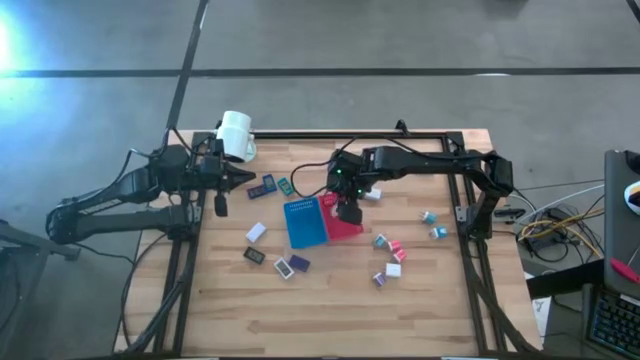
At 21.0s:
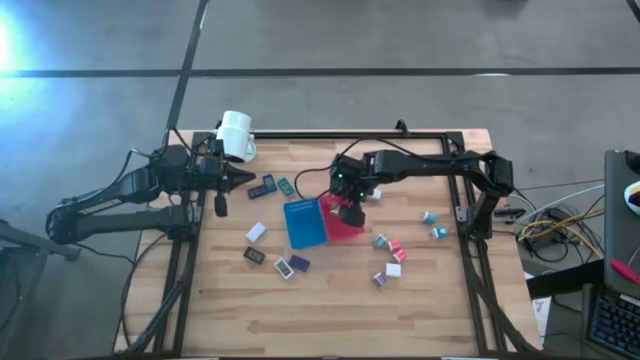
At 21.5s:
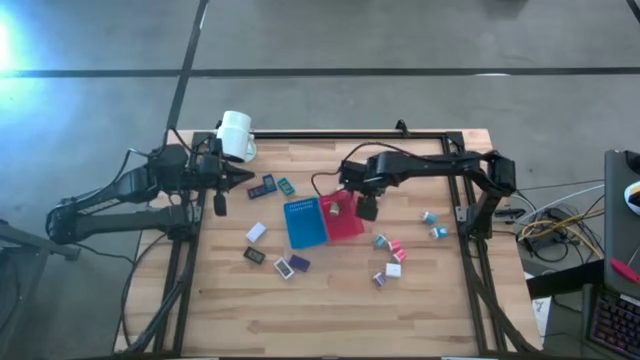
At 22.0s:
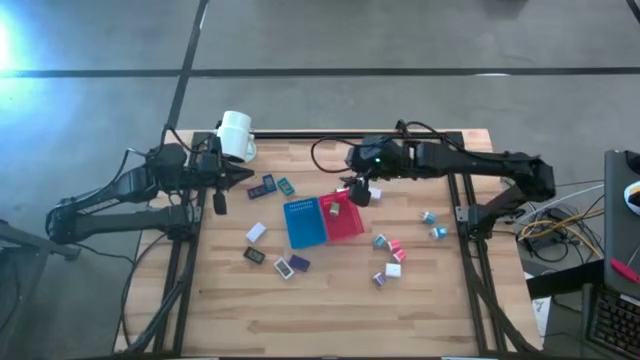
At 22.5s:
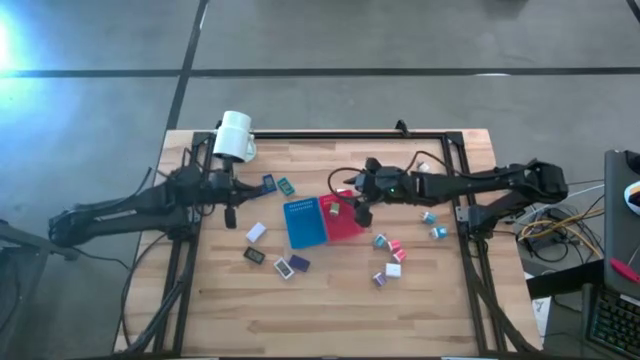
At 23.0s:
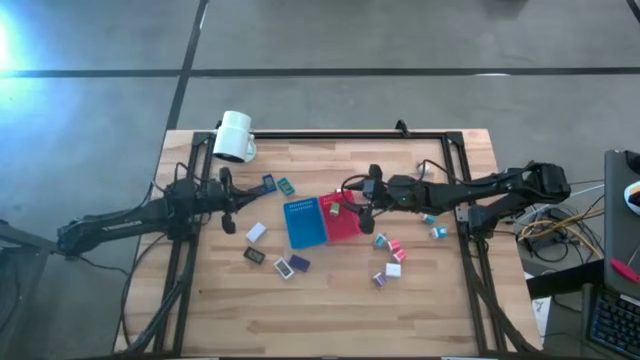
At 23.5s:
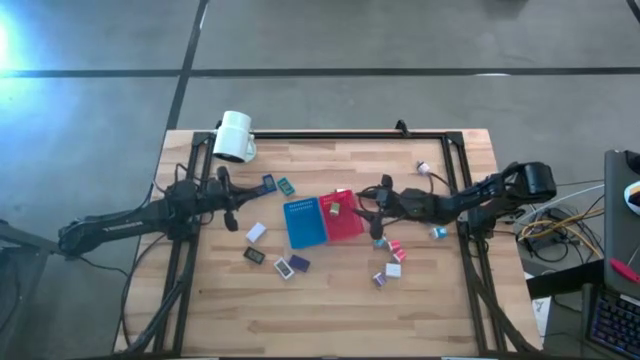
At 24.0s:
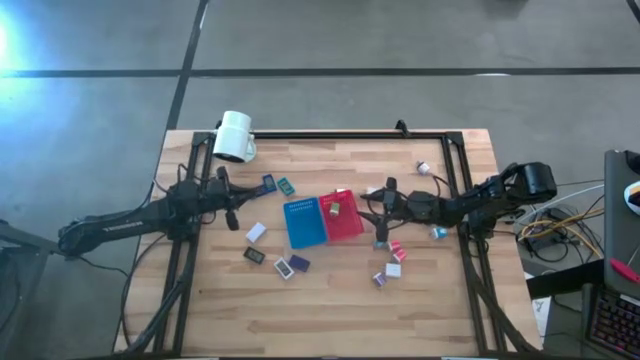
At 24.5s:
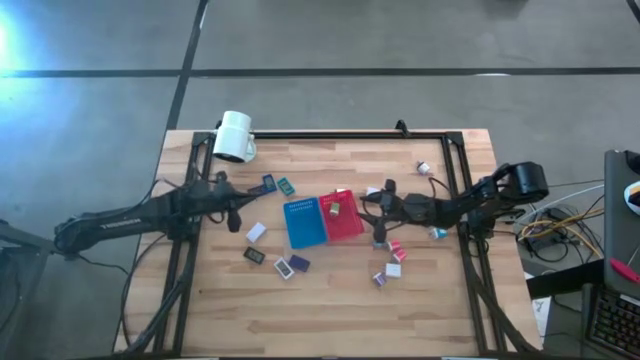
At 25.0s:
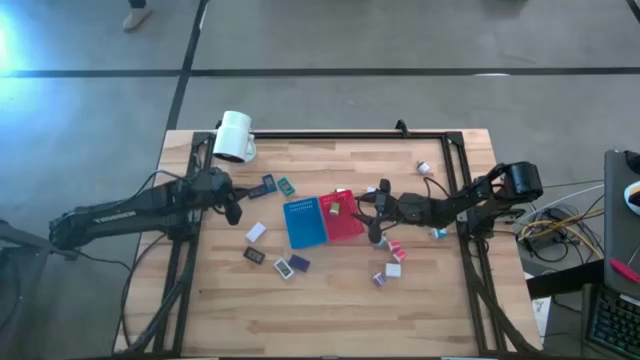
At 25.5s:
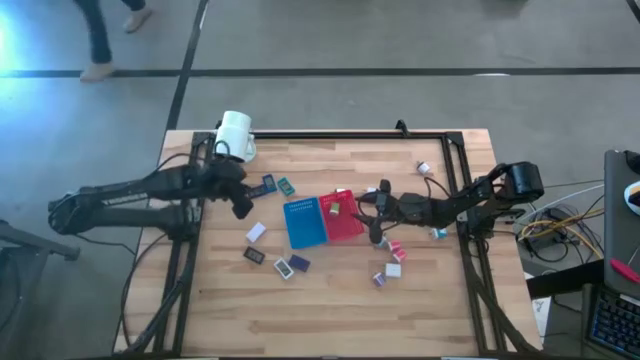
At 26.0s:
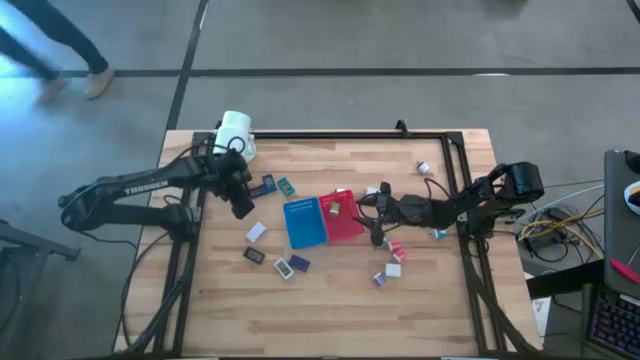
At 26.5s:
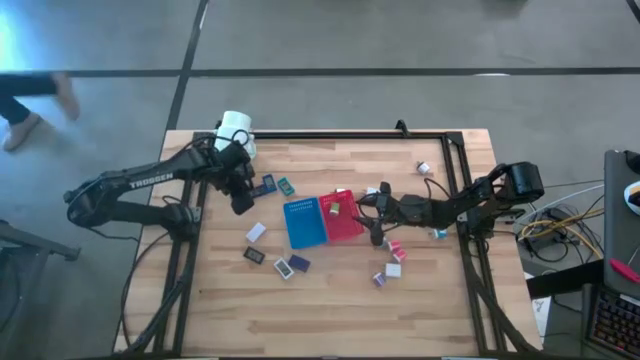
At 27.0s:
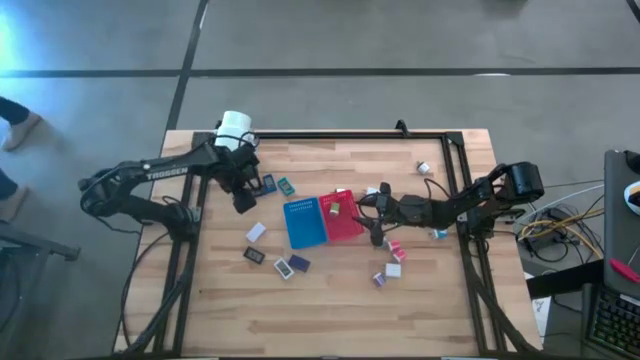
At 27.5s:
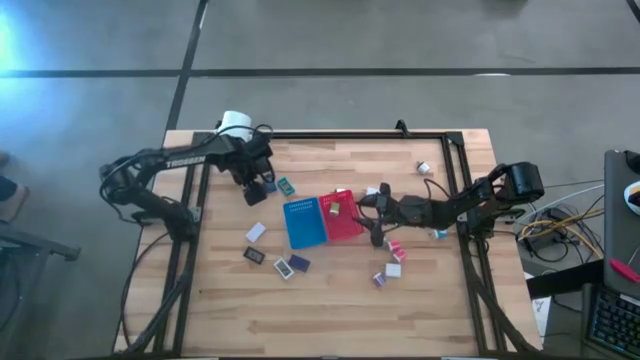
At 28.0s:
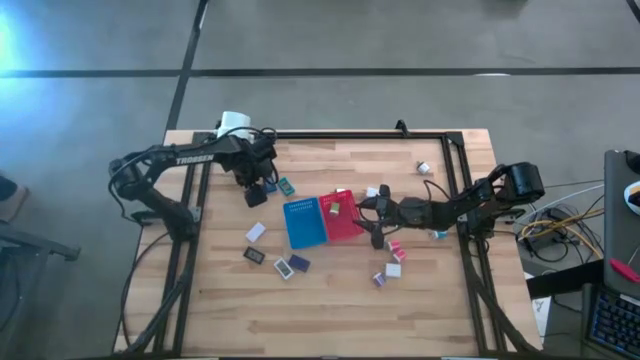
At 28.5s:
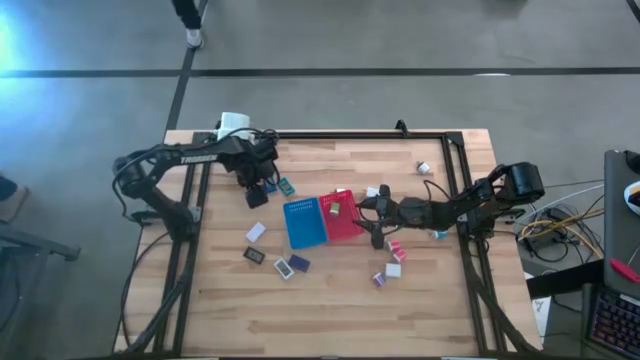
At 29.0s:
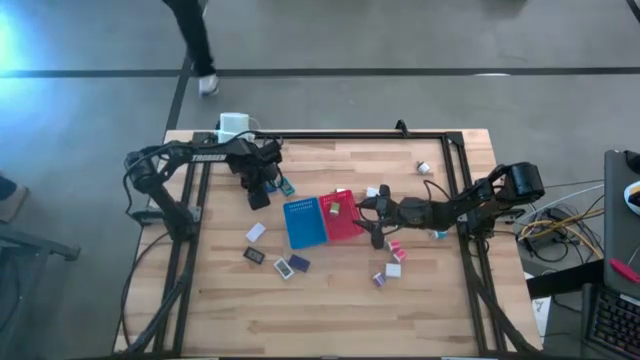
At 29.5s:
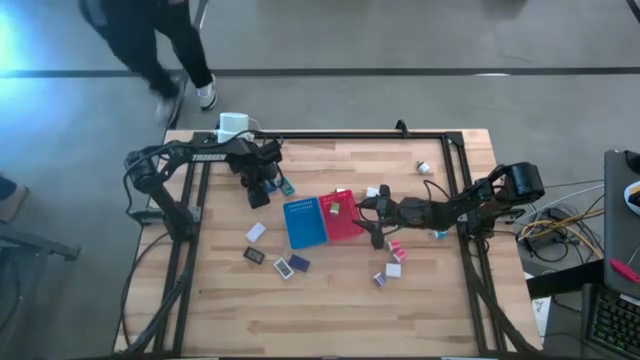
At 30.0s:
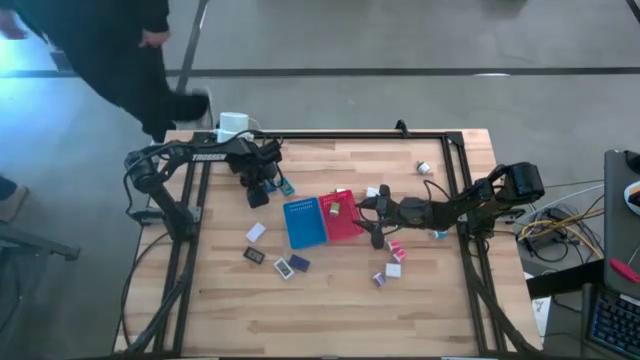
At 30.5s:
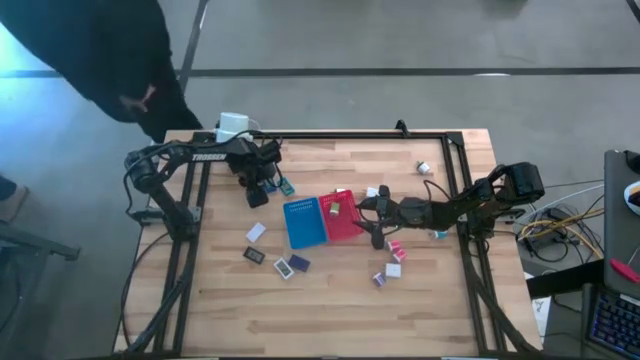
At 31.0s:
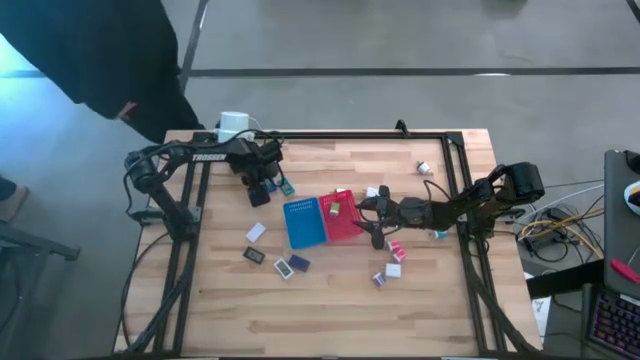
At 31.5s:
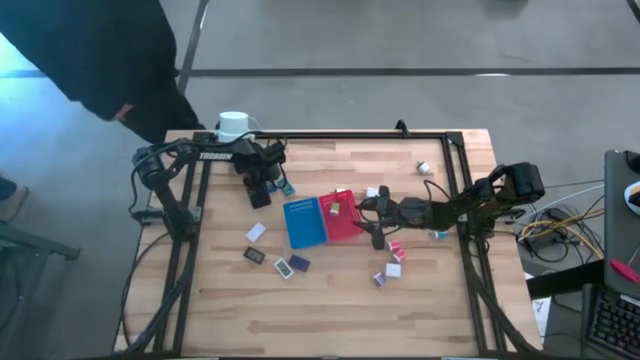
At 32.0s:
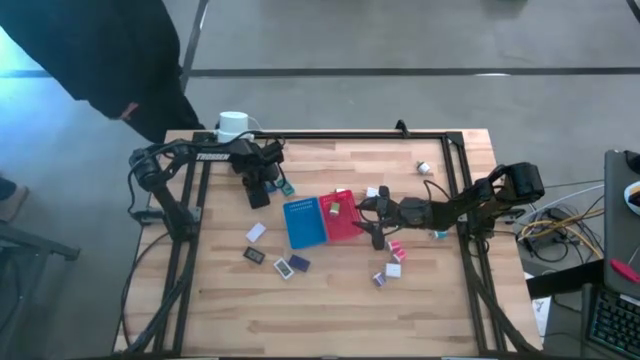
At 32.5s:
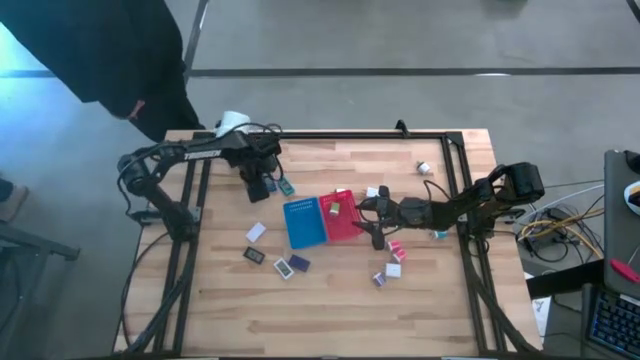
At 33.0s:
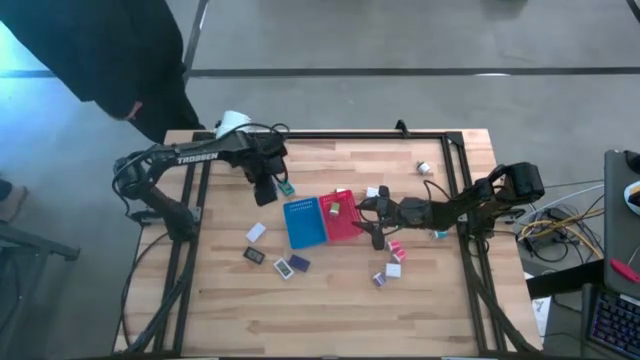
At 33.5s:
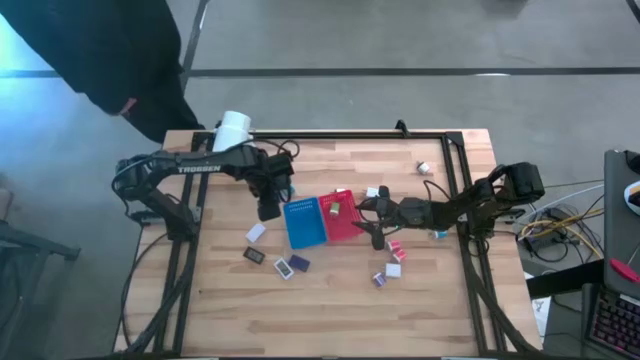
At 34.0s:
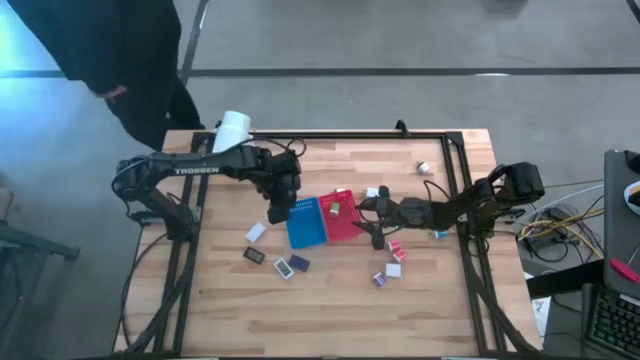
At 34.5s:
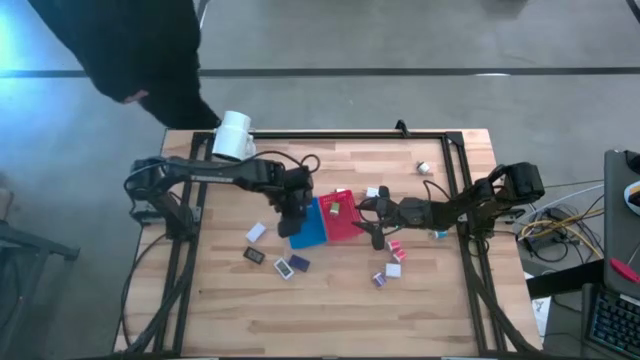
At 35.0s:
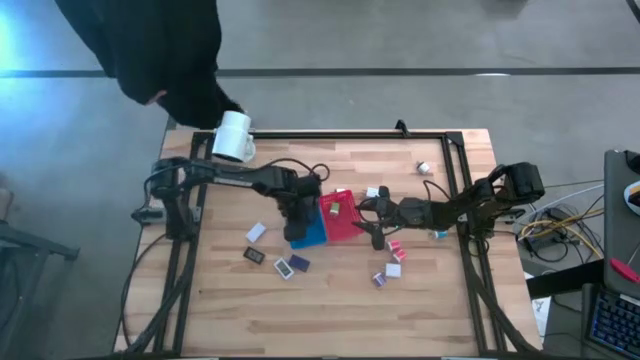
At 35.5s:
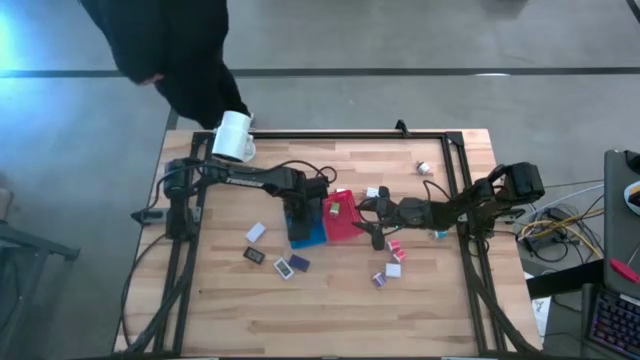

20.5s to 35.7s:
Task: Pick & Place Office items
Put the top violet digital clock into the blue bin

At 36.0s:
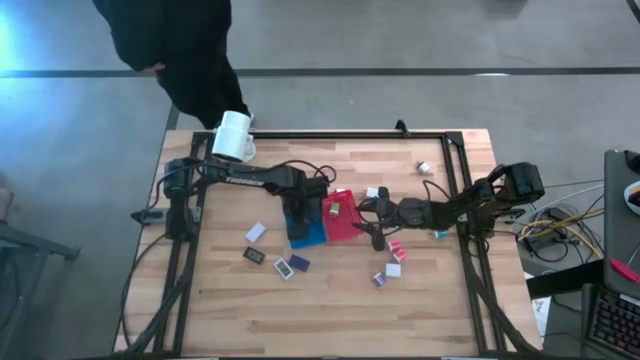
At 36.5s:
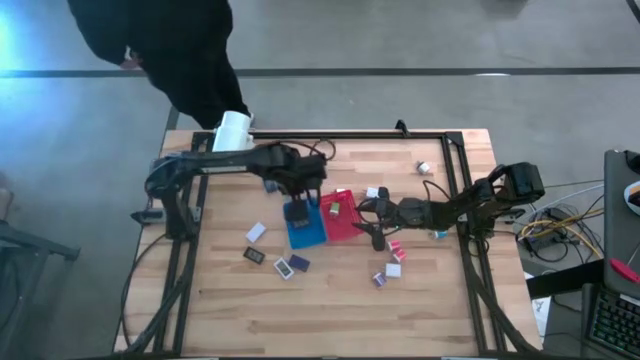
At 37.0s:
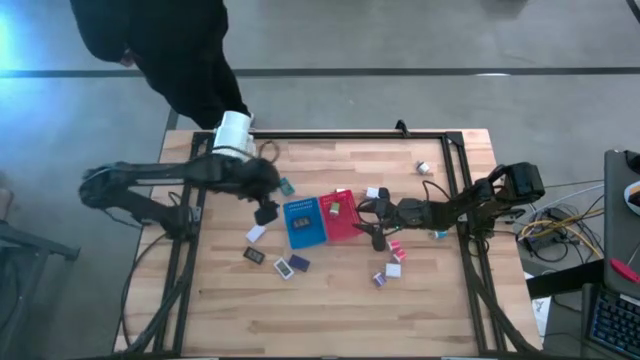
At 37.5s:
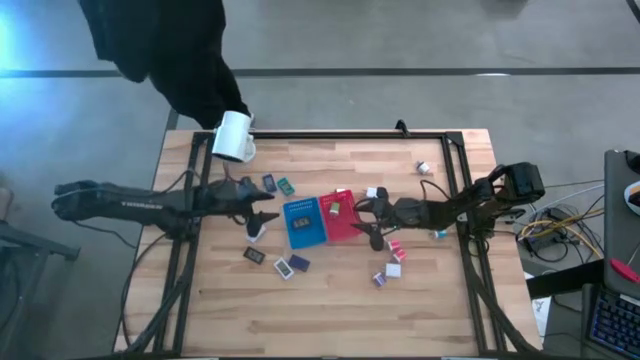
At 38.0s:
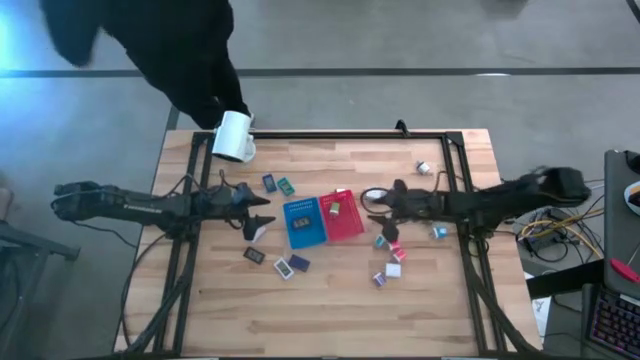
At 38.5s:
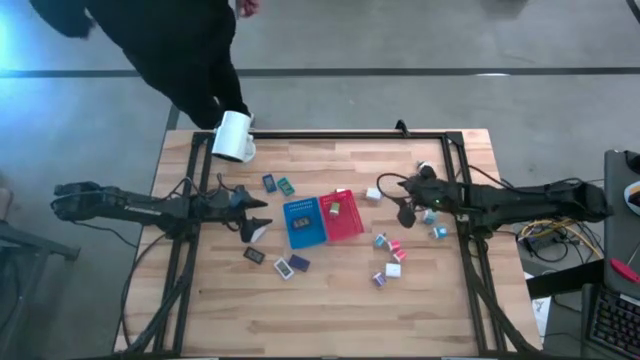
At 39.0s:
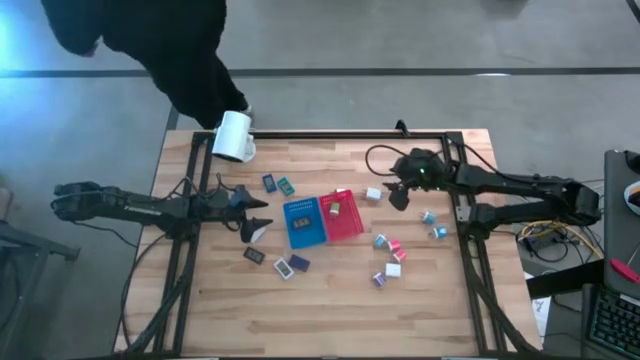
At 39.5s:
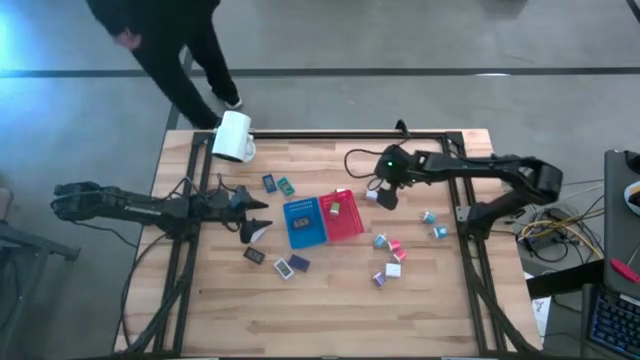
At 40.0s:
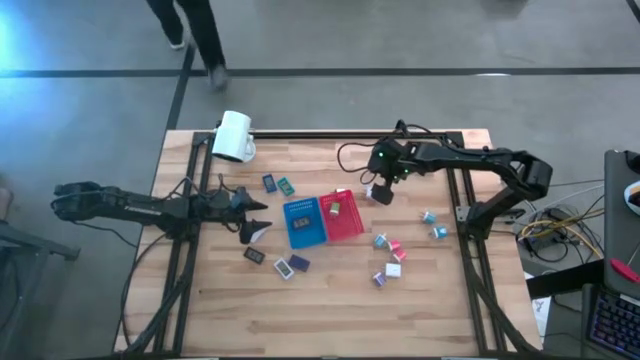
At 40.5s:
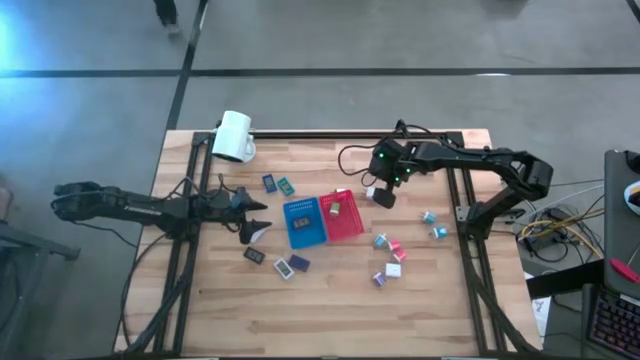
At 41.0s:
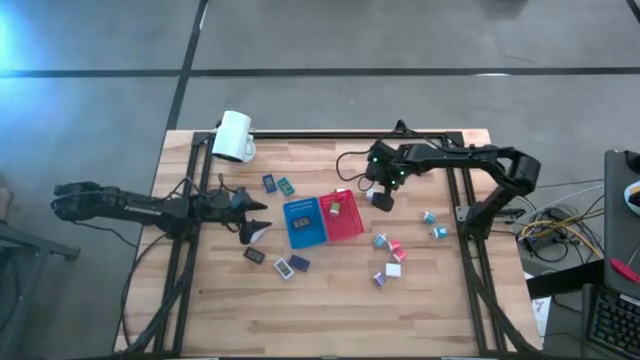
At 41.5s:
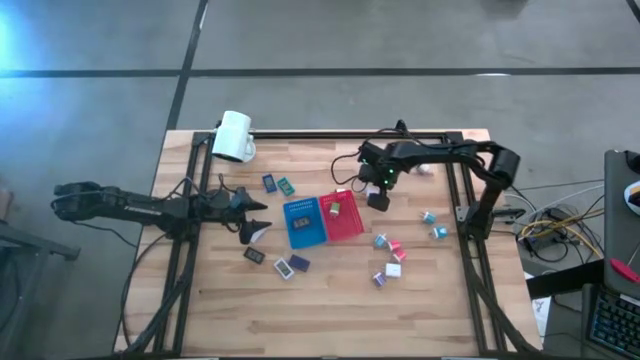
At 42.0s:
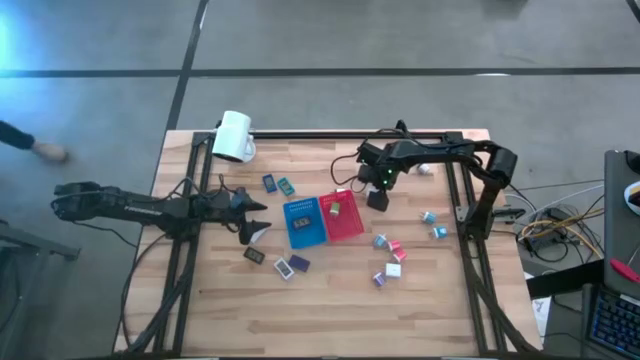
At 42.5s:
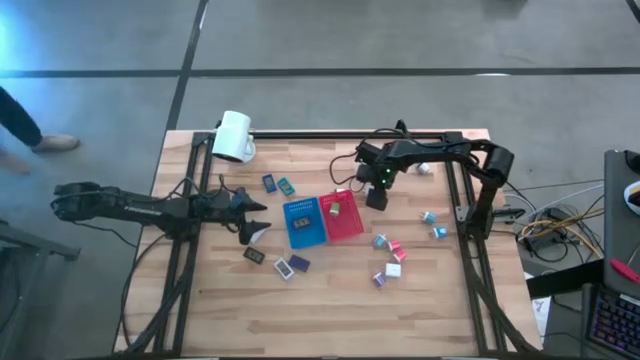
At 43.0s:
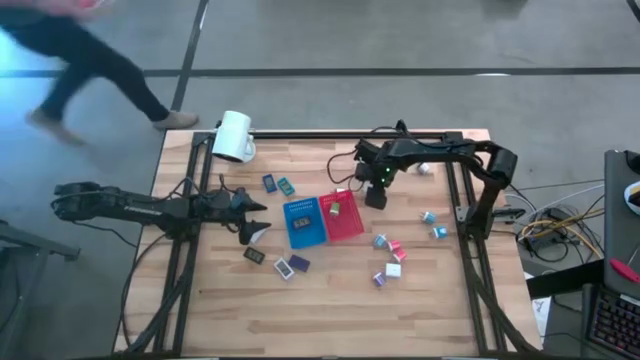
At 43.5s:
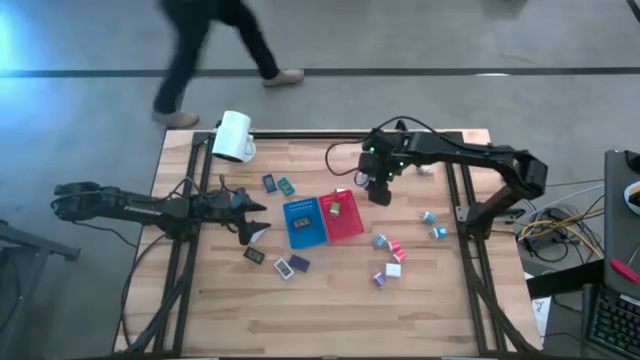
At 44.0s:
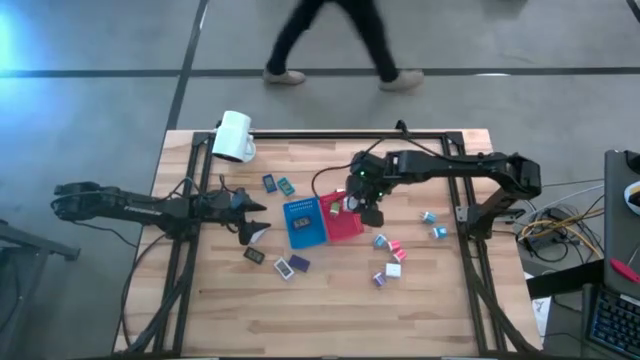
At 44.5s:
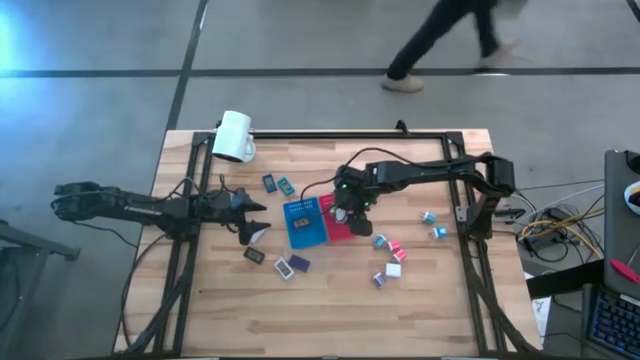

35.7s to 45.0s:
Put the top white charger adapter into the red bin
